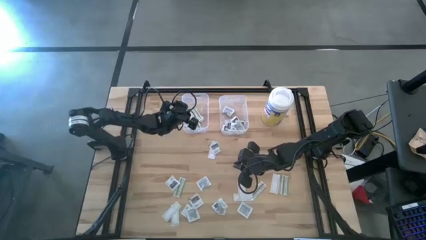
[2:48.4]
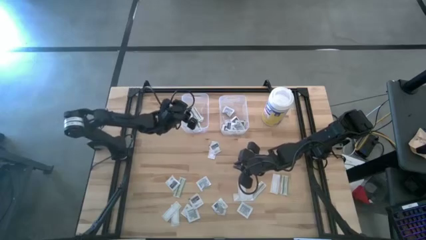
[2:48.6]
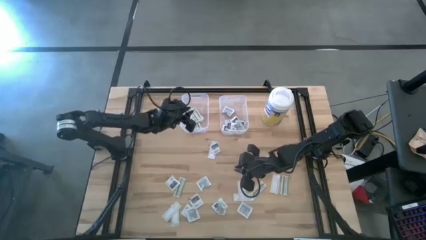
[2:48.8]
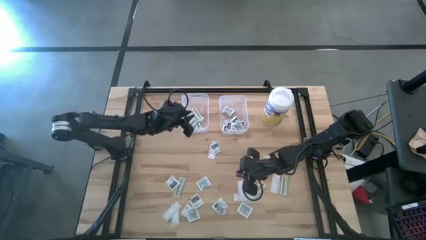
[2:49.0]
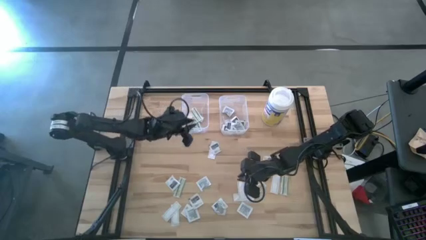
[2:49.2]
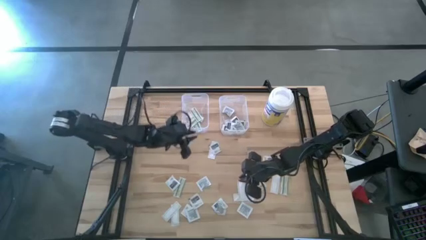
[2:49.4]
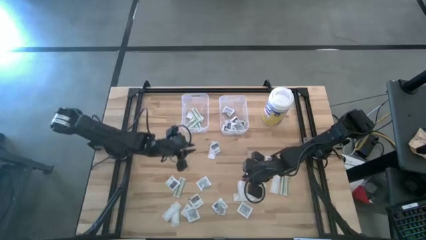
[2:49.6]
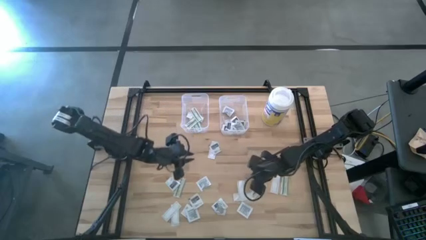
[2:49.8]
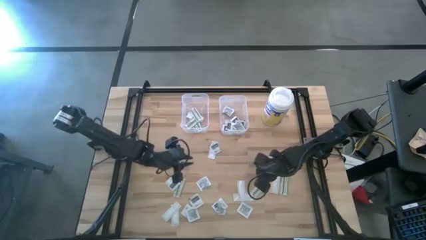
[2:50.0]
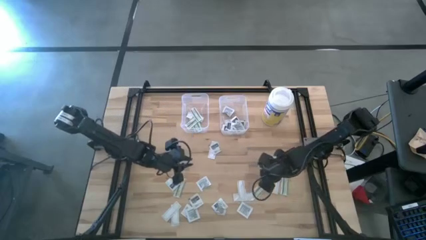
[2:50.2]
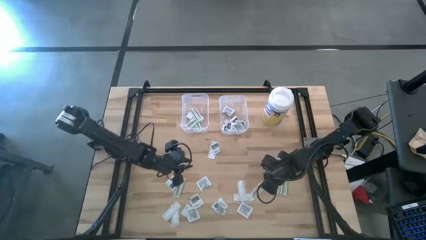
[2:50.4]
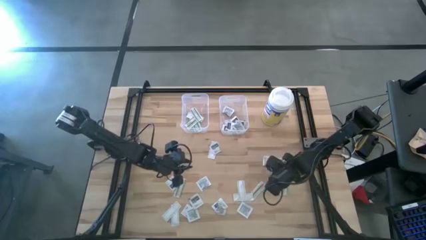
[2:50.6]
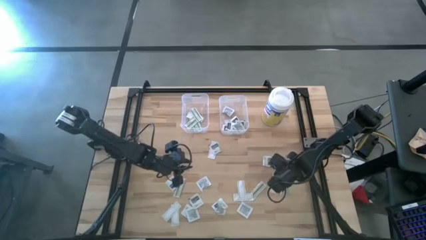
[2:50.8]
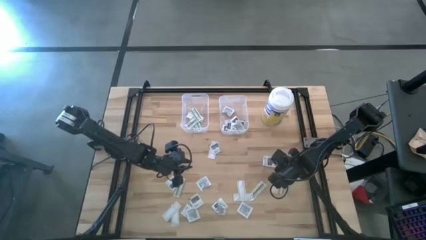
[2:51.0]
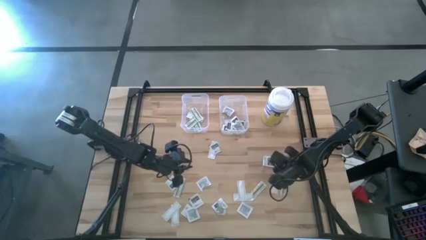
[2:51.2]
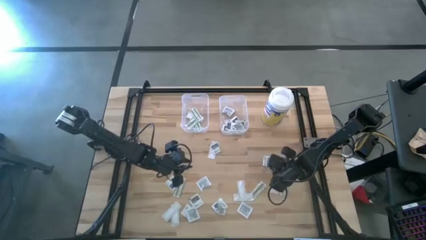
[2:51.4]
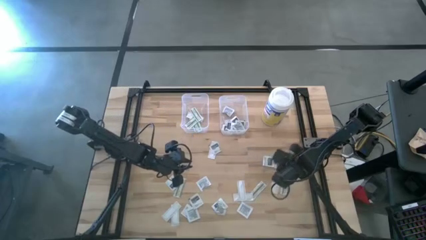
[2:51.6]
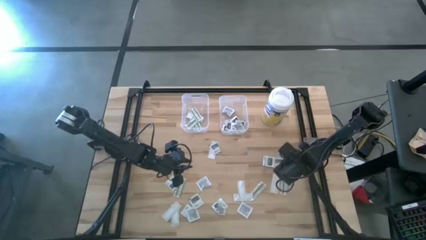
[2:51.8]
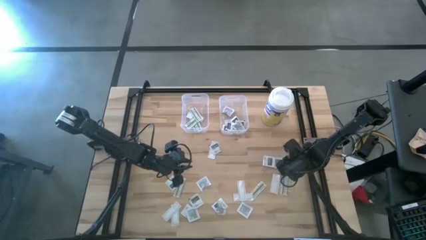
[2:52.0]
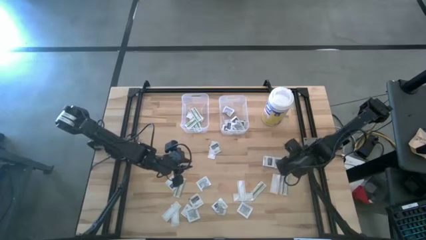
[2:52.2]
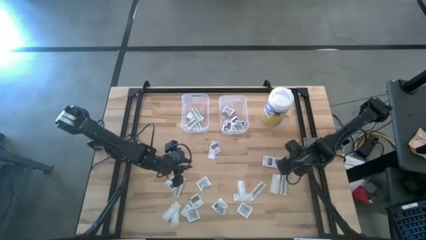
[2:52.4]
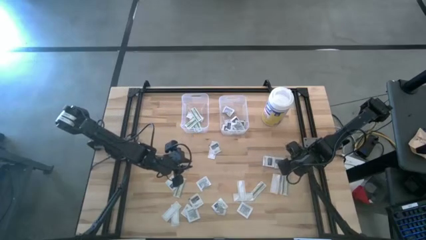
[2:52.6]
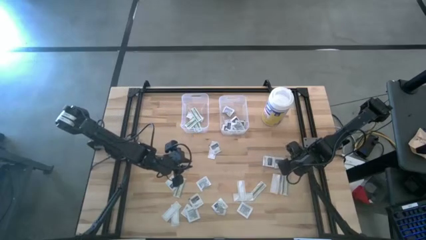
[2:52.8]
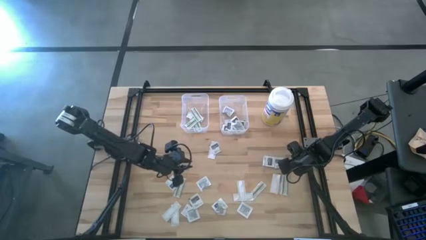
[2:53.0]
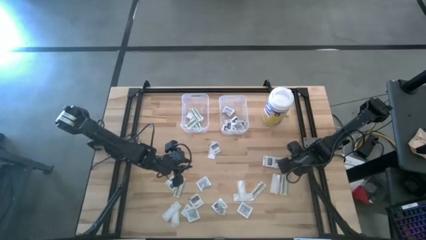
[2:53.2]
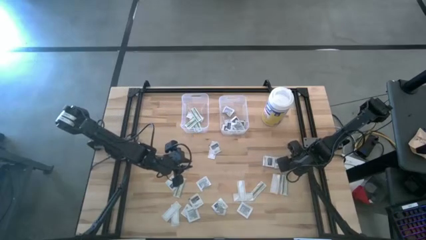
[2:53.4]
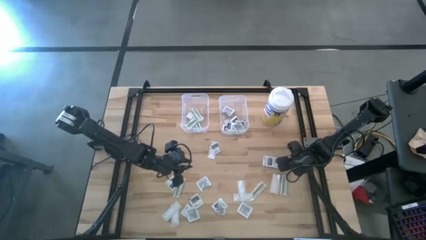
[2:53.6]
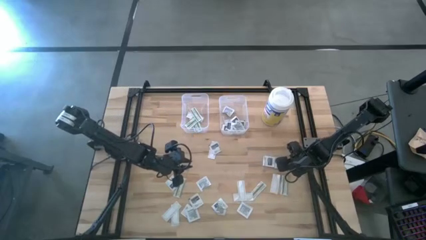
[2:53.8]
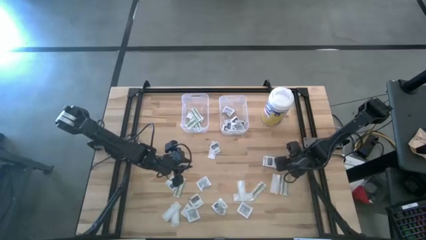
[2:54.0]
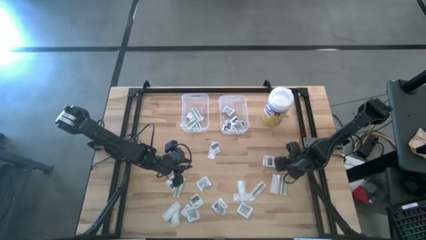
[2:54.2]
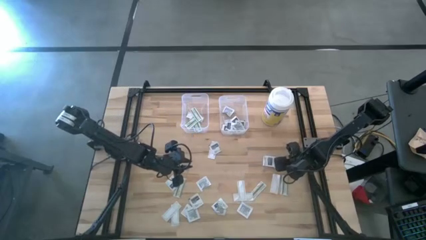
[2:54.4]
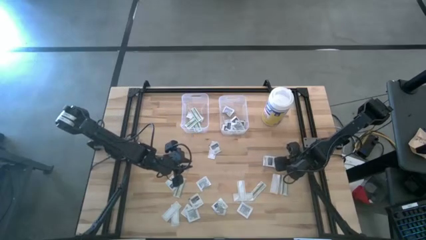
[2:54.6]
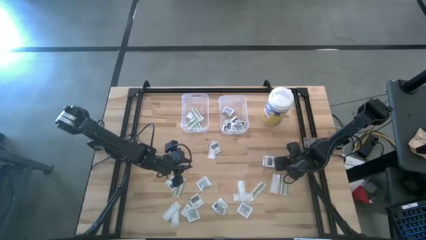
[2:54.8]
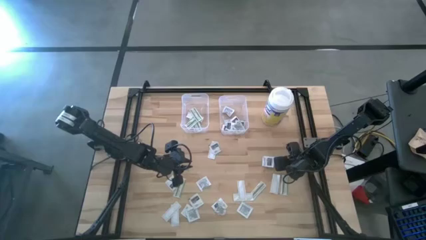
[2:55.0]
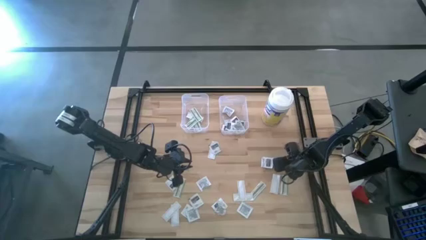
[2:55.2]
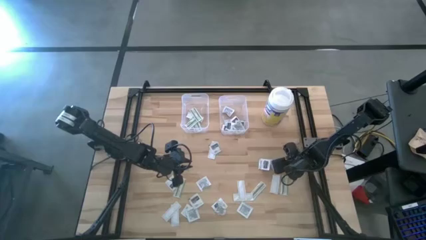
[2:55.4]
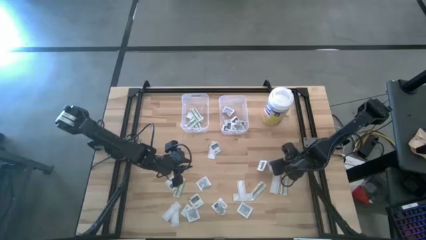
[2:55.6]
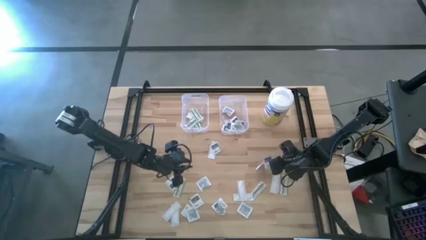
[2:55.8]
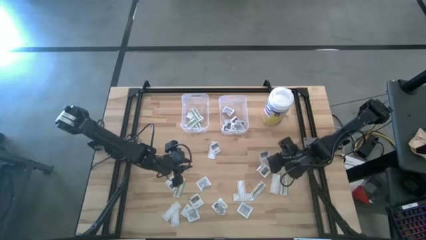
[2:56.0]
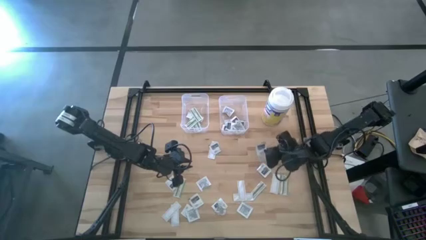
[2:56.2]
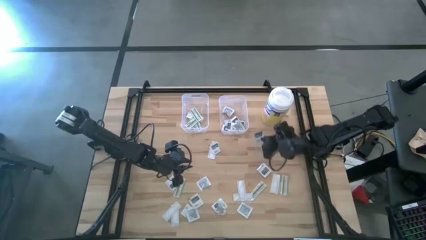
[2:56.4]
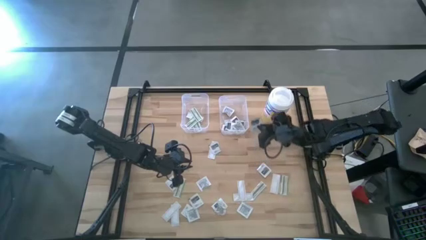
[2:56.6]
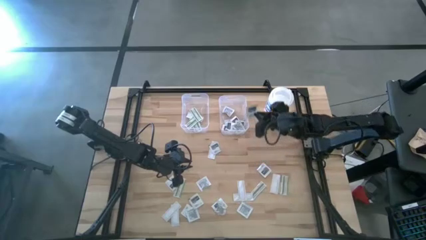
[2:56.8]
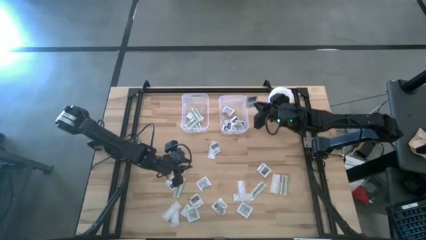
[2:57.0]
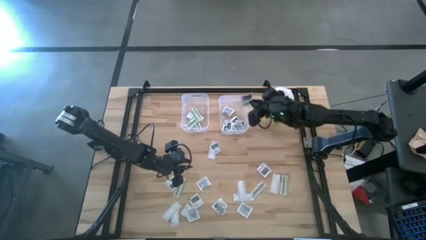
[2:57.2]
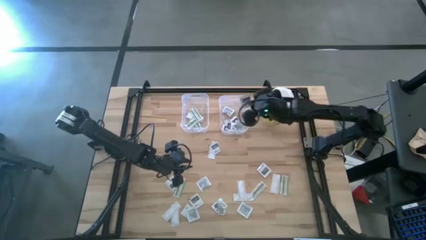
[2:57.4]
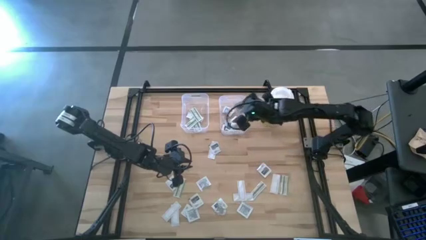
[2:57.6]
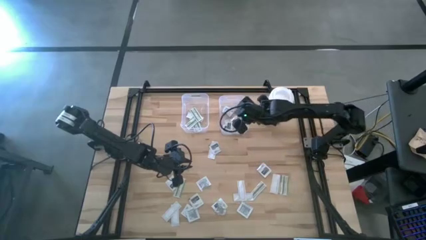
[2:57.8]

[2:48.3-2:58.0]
Task: Pick & Place First Aid Supplies
Put the gray towelette pack into the right transparent bin

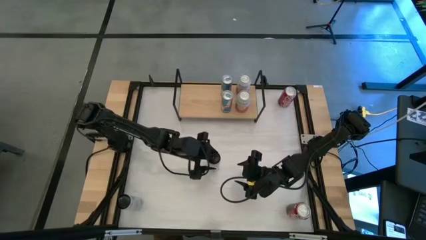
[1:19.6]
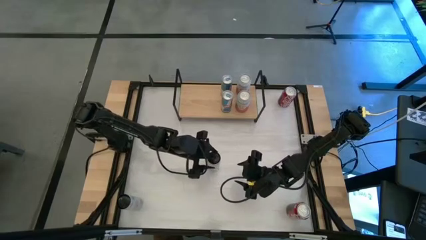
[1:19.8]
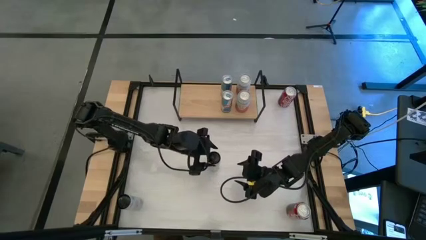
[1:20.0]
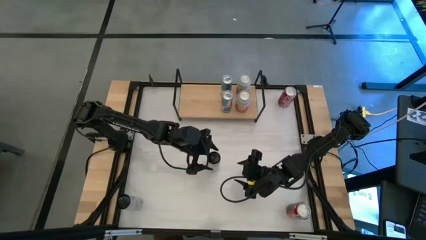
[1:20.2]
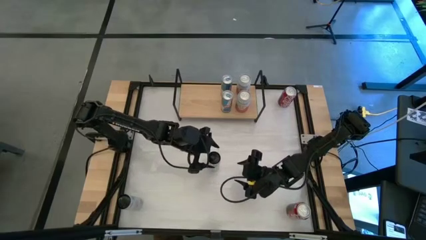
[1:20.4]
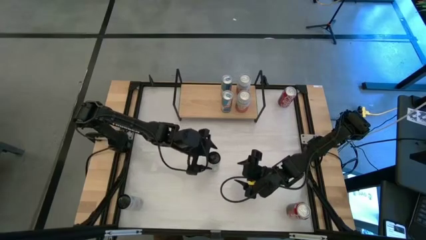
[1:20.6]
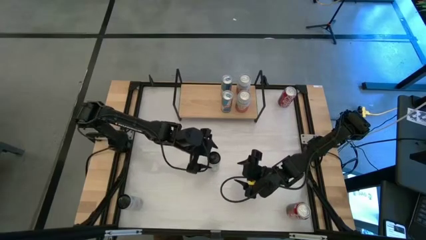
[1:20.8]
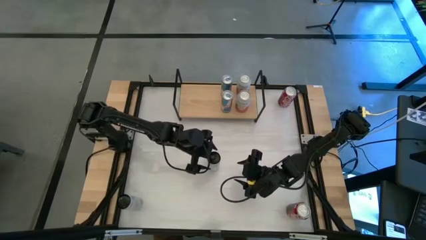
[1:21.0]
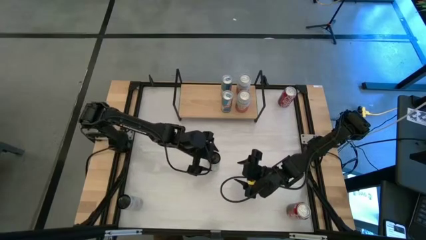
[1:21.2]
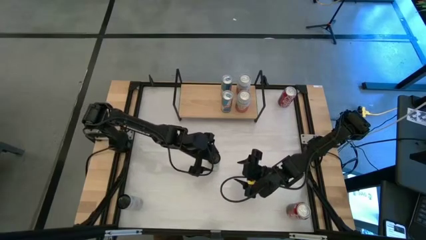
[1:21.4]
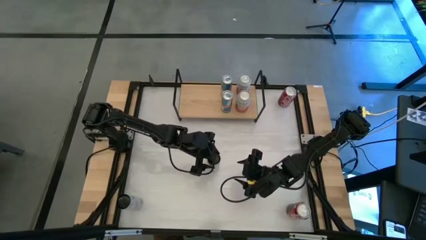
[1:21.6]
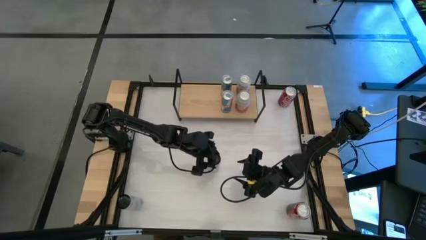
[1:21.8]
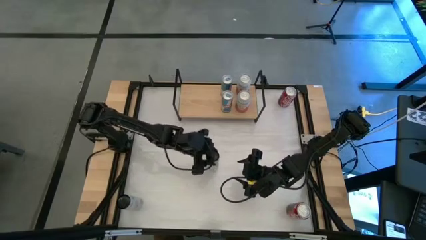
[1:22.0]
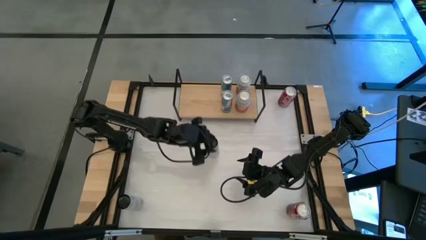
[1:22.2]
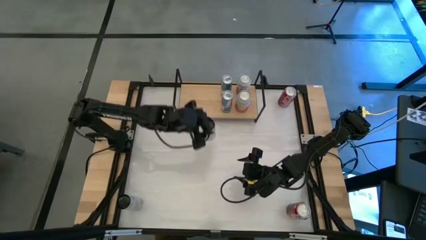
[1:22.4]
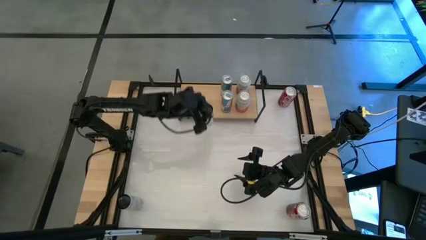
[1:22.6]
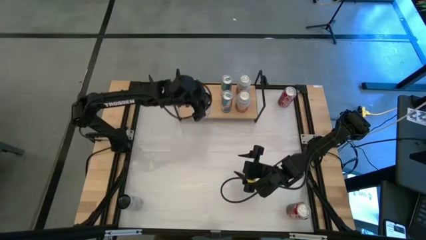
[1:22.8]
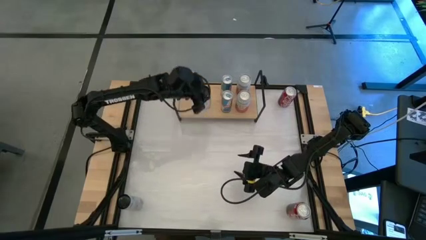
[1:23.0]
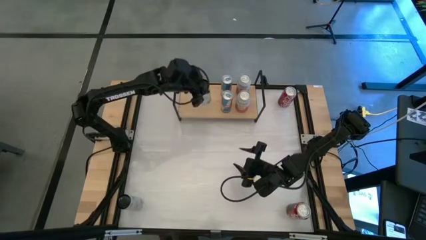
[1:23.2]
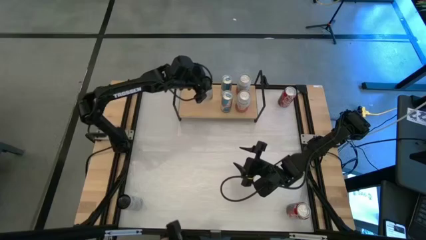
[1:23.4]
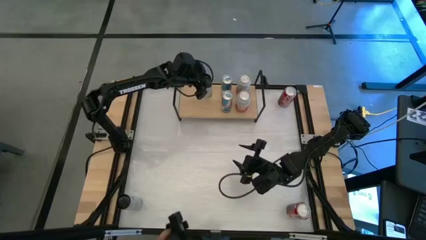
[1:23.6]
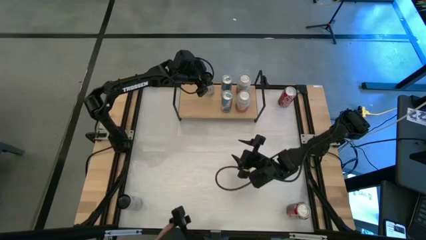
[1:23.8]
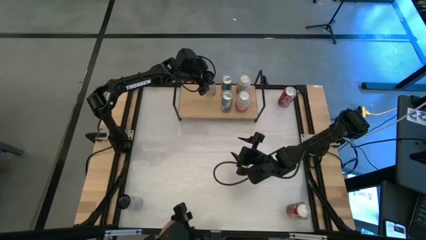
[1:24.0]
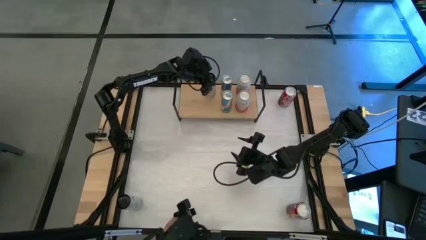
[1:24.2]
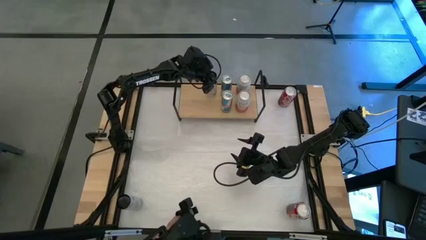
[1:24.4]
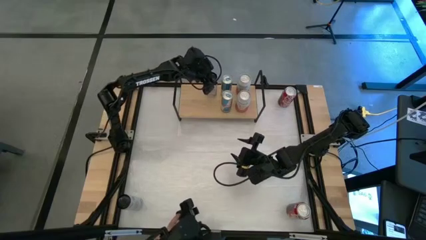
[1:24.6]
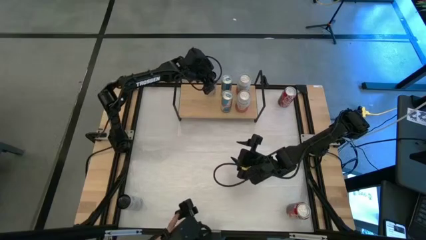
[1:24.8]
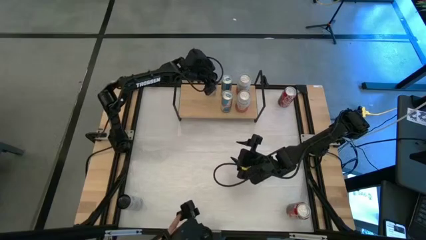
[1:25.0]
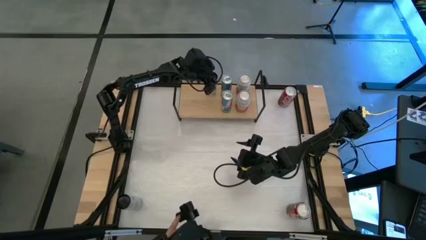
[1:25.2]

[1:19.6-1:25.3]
Task: Place canned beverage on shelf
Put the right white soda can on the shelf
